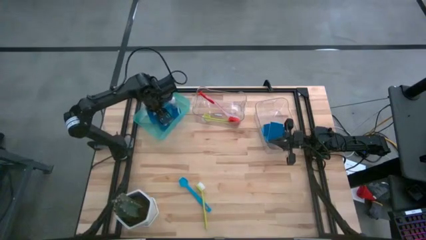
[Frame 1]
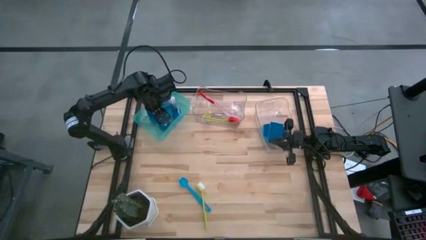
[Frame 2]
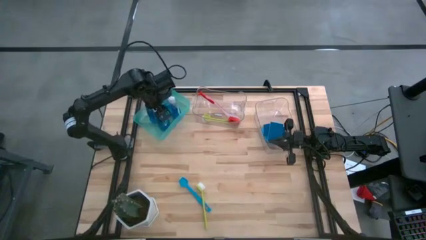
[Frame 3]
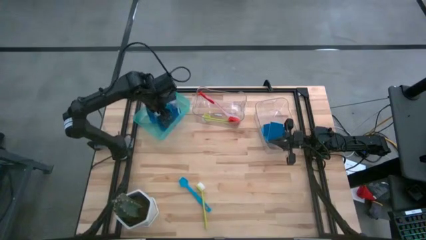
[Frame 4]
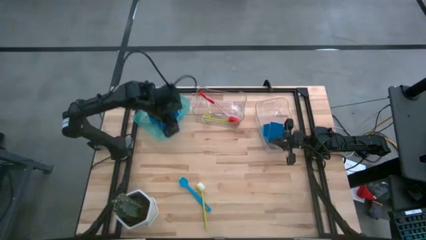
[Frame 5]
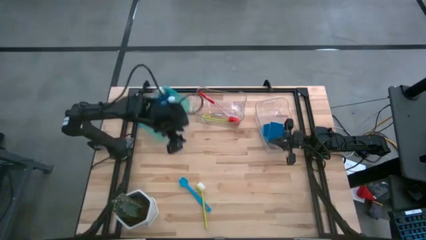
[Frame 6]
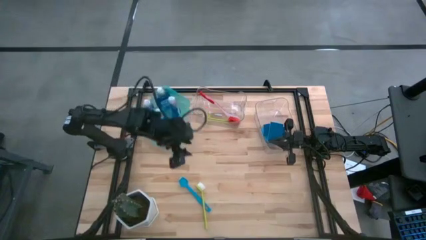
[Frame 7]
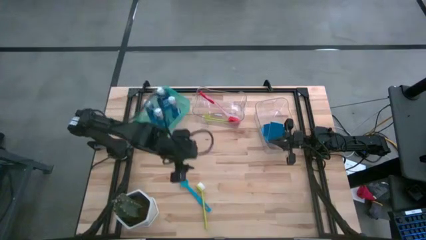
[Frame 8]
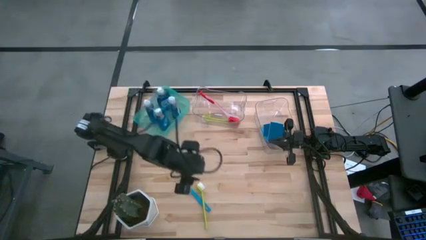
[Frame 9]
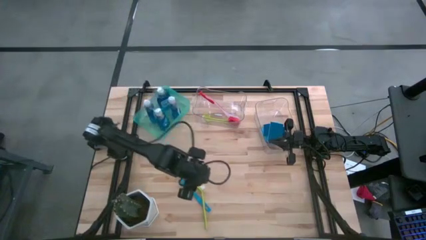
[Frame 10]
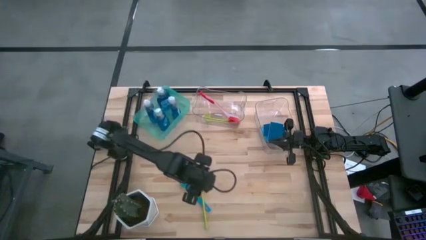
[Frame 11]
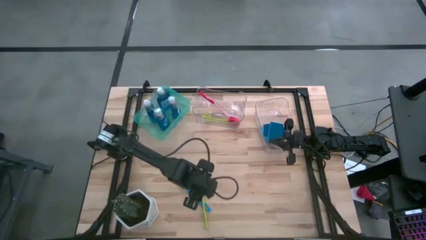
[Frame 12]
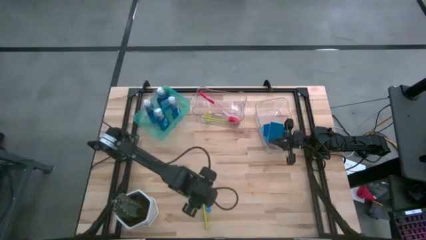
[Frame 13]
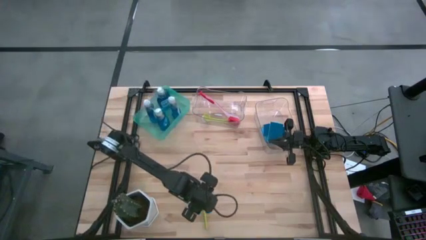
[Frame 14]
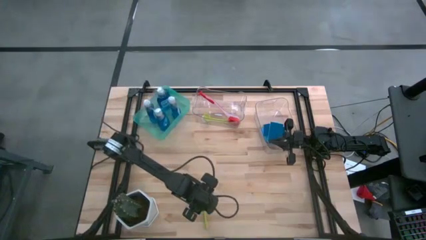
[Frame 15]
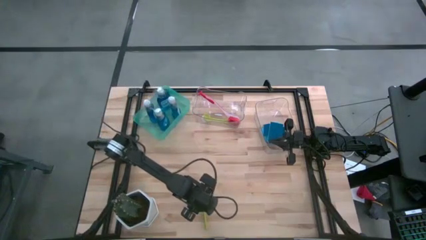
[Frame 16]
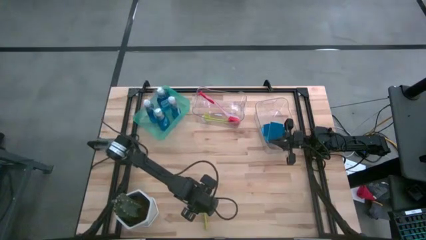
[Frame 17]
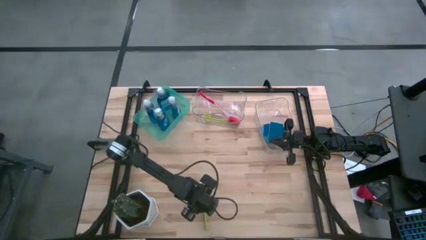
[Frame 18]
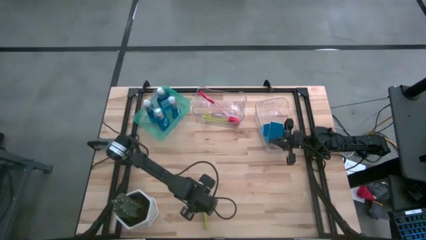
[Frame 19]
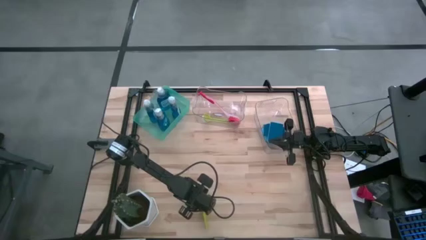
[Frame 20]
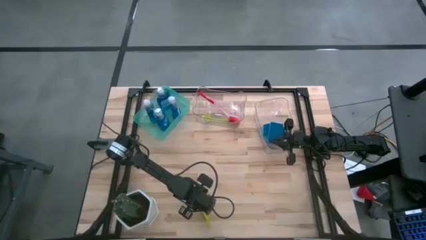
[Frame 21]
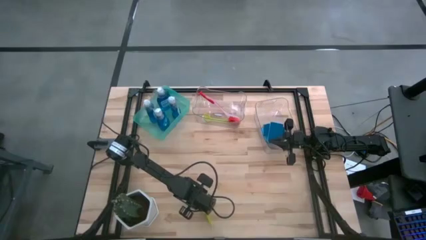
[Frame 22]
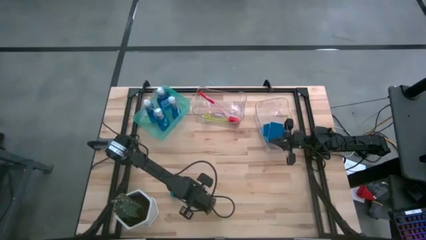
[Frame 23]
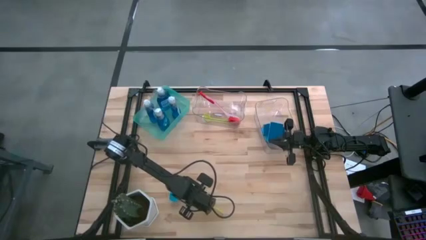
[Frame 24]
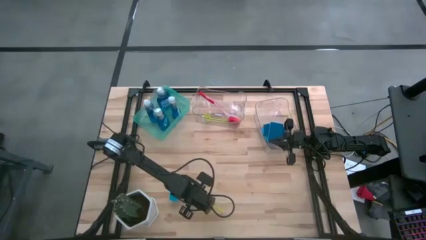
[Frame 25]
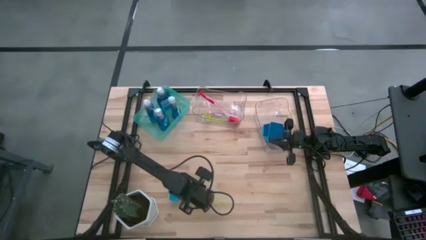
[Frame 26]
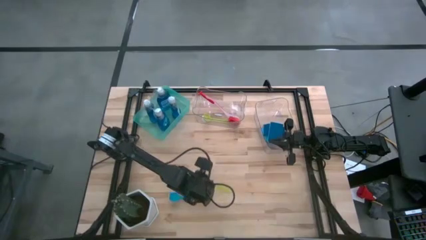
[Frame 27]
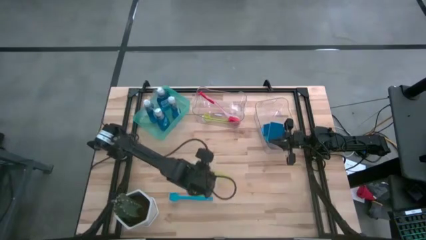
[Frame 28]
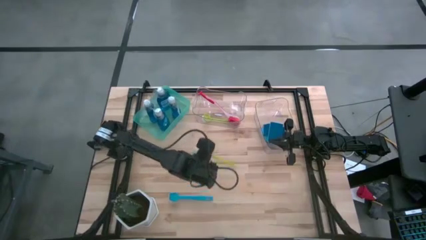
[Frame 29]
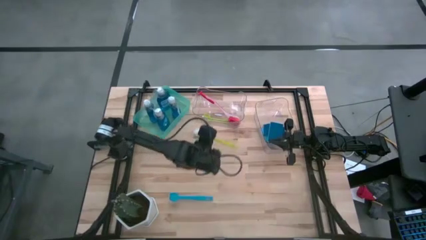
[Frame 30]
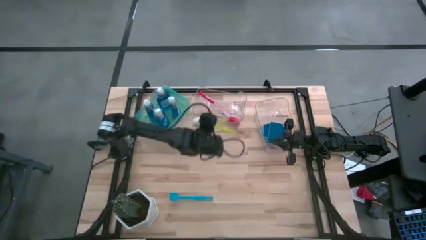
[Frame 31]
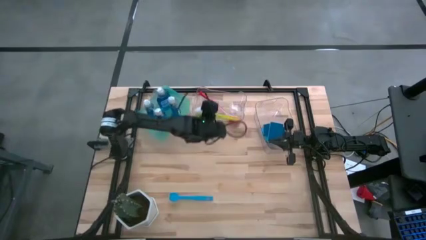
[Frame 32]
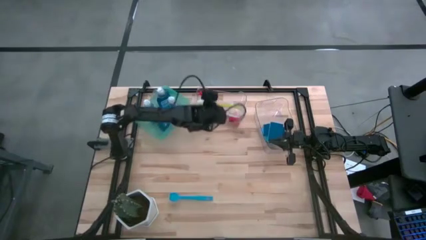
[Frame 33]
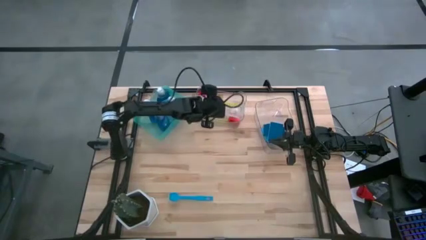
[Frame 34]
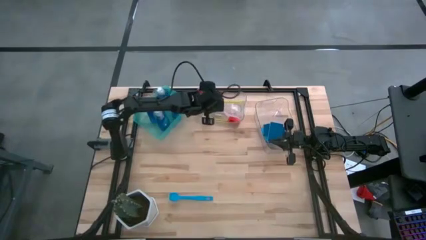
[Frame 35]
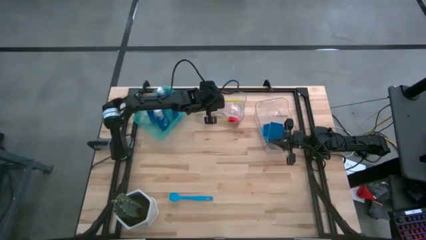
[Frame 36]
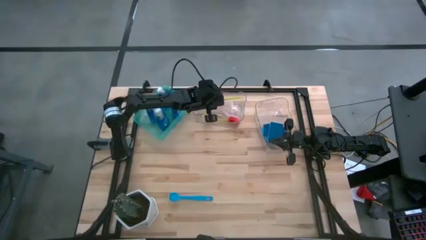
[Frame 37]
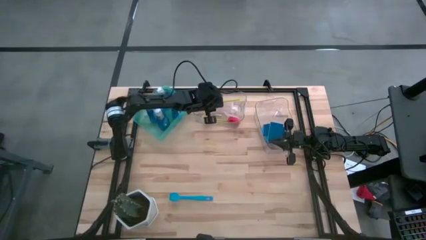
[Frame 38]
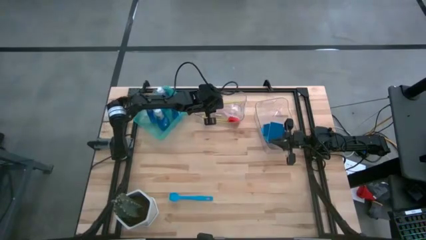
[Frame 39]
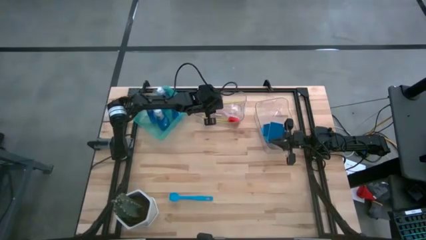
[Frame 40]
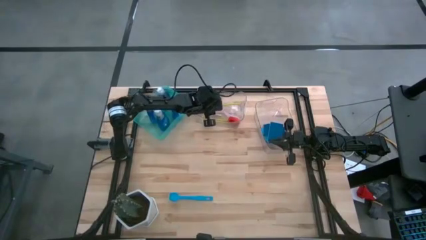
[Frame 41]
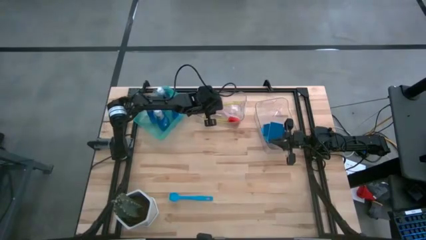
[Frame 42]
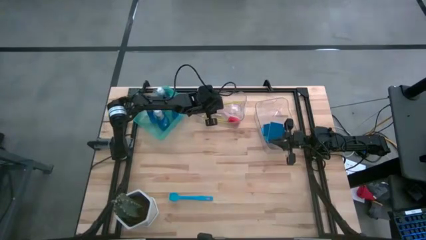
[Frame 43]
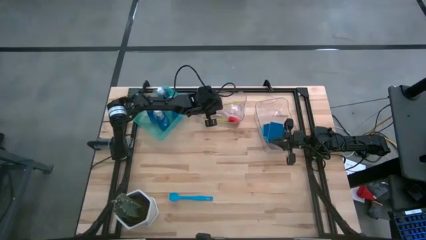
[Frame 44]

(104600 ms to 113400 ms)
Task: Pick & Place Kitchen Sink Supplies
Put the green dish brush in the left transparent bin

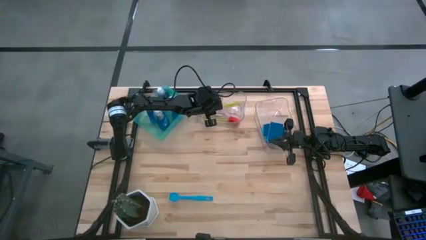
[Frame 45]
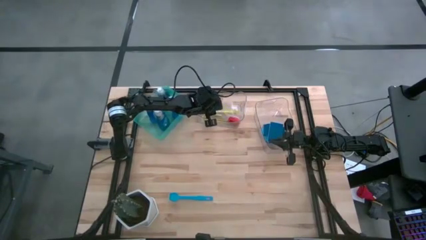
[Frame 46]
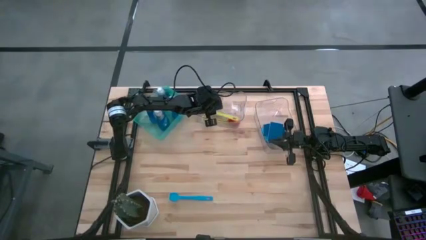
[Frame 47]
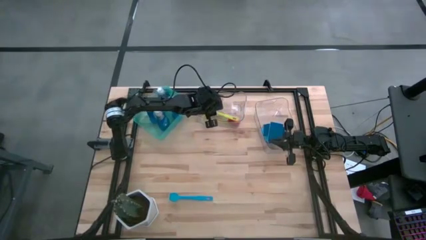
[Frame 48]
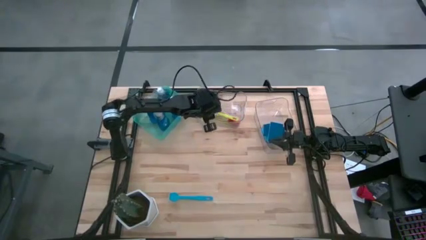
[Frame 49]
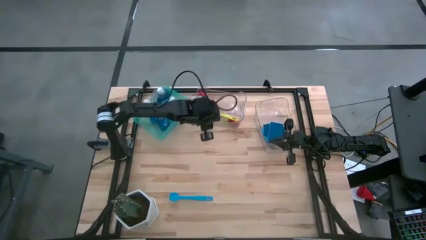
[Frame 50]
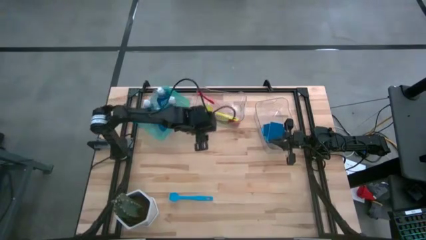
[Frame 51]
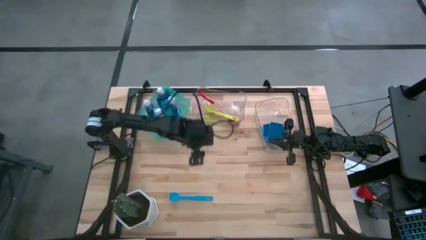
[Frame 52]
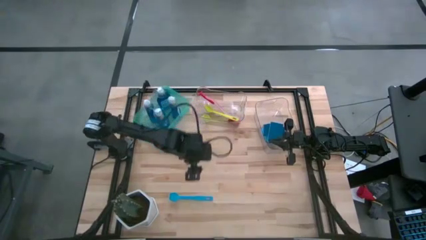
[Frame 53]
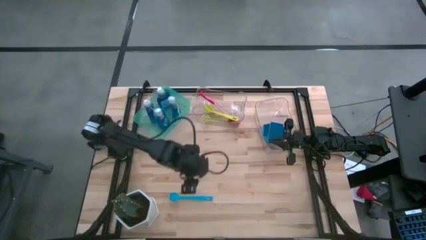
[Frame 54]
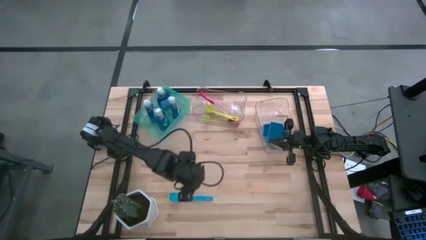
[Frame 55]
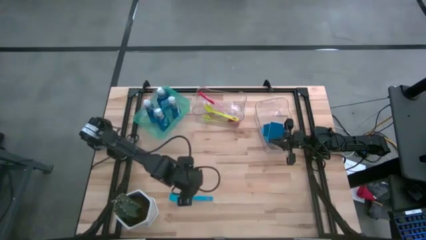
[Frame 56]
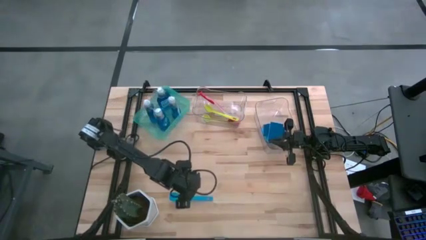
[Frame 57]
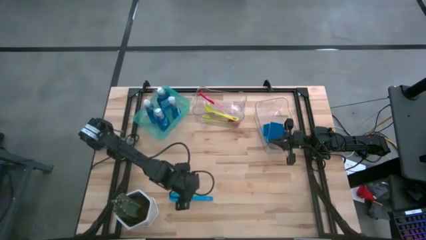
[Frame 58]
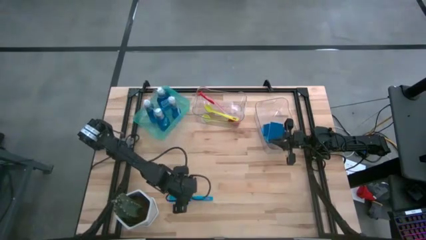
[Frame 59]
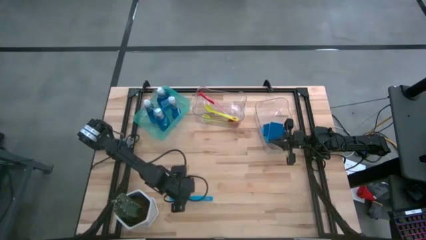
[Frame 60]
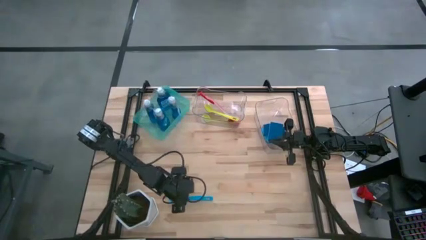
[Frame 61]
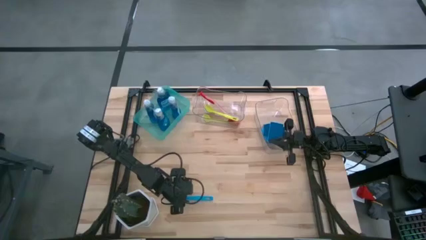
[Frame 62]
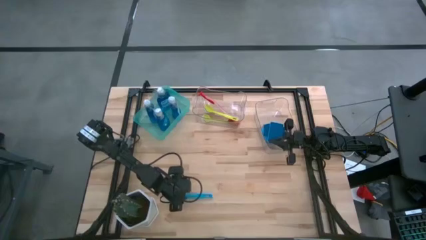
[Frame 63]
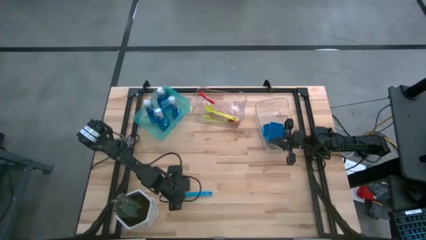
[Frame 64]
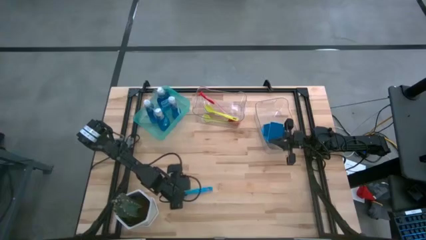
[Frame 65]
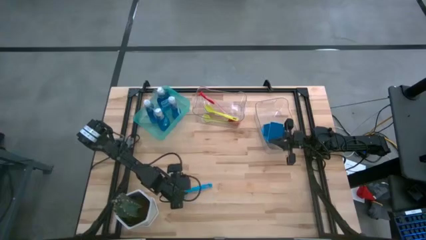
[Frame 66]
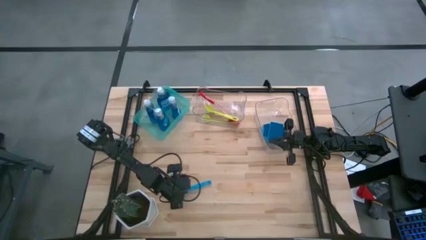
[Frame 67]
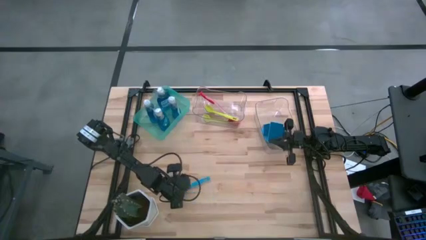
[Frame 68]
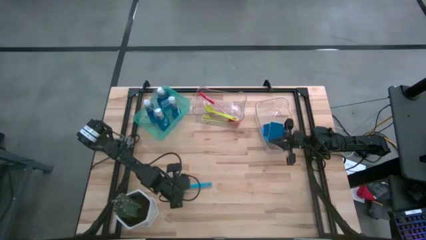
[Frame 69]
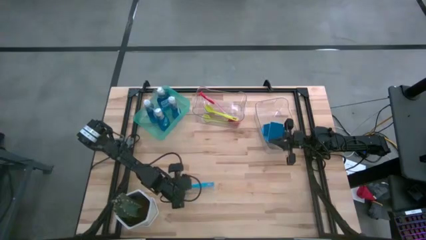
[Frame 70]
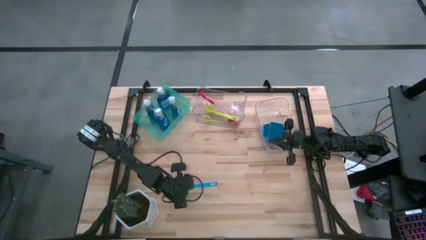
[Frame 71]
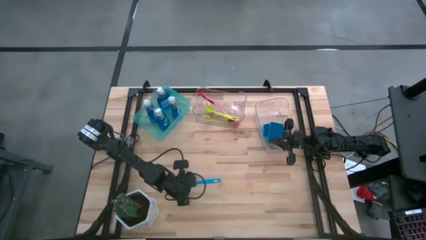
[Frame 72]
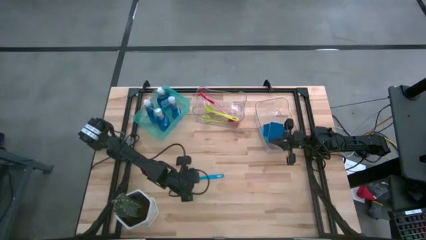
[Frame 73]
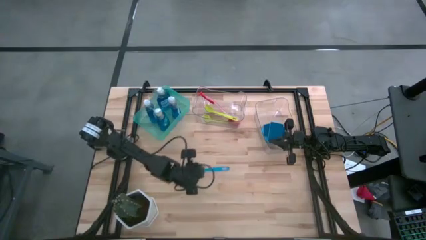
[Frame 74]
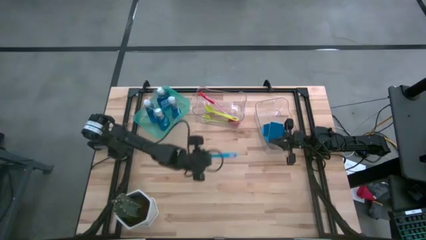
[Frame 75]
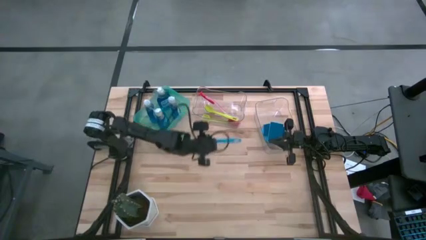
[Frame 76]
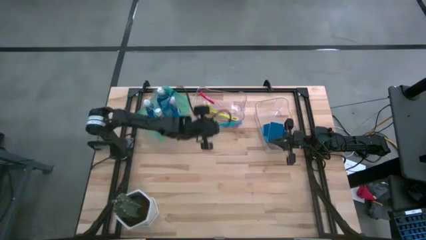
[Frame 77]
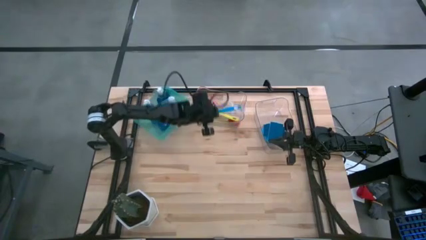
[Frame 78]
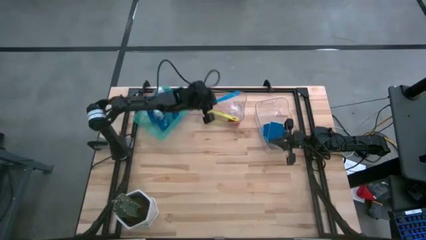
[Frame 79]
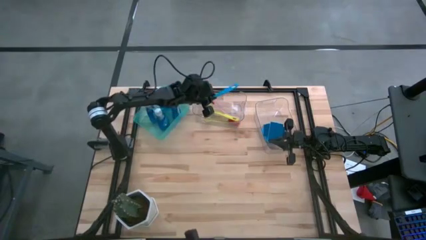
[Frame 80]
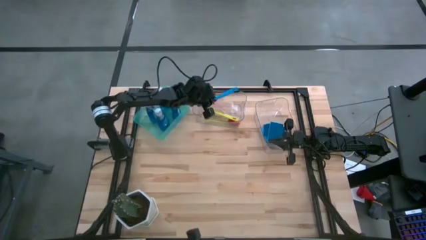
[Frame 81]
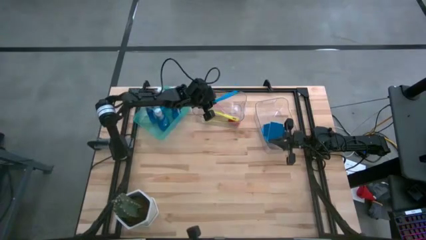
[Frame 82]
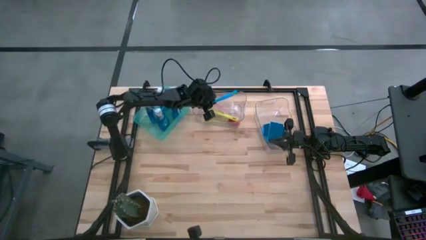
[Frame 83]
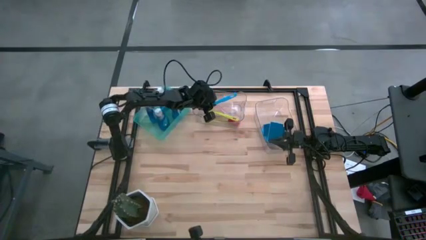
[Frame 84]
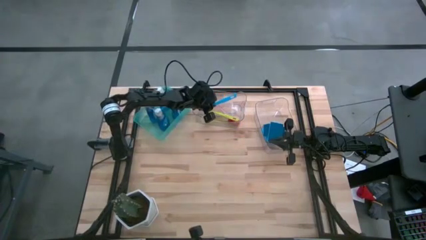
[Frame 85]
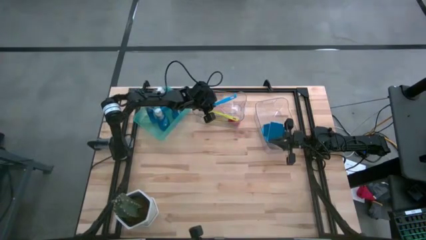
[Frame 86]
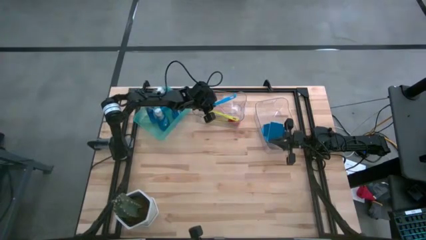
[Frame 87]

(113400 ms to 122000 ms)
Put the blue dish brush in the left transparent bin
